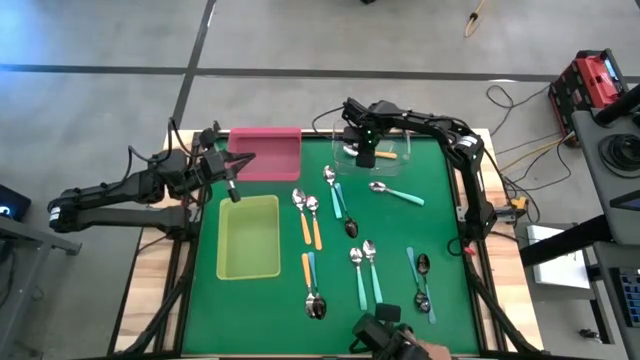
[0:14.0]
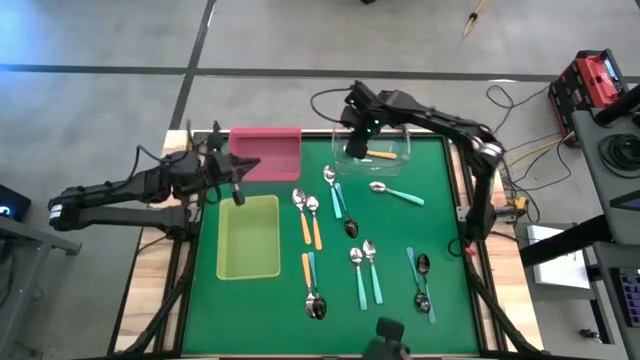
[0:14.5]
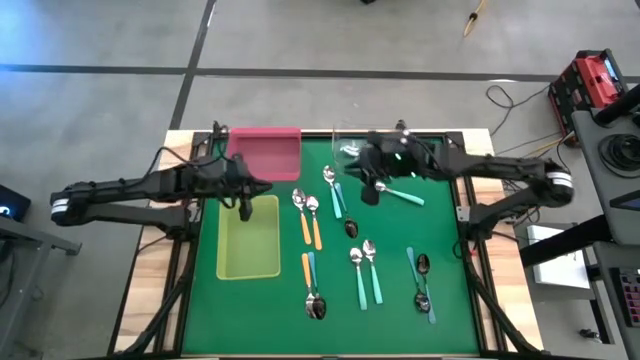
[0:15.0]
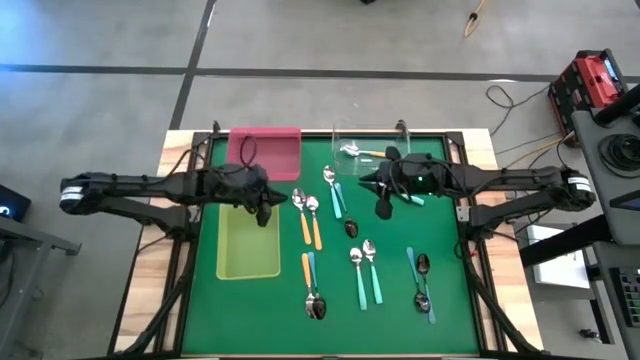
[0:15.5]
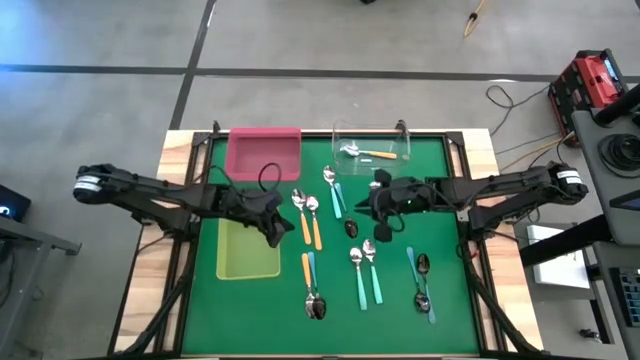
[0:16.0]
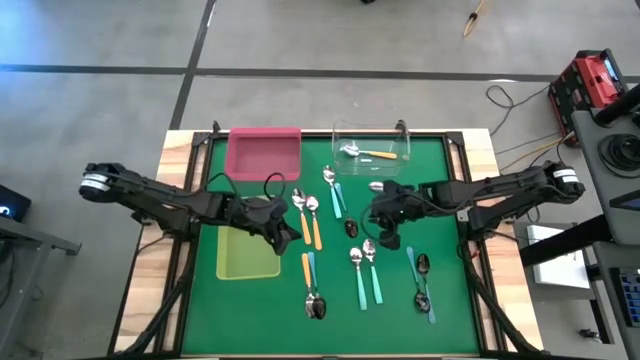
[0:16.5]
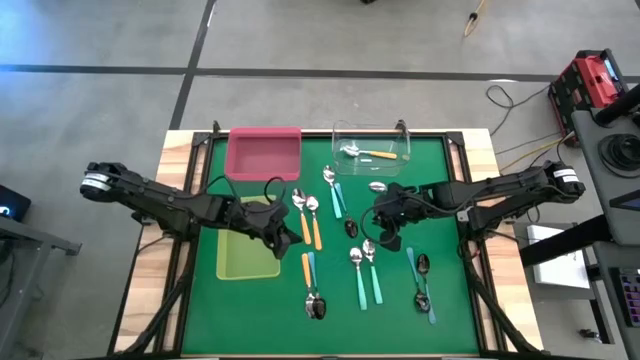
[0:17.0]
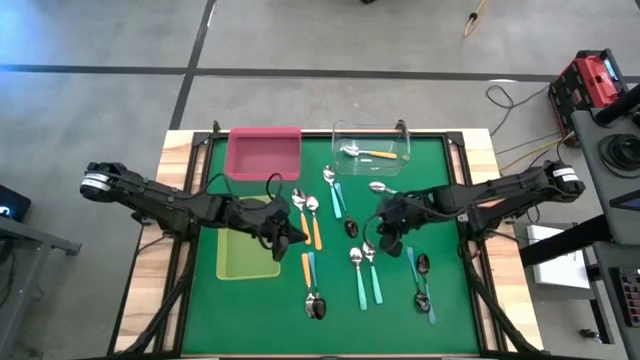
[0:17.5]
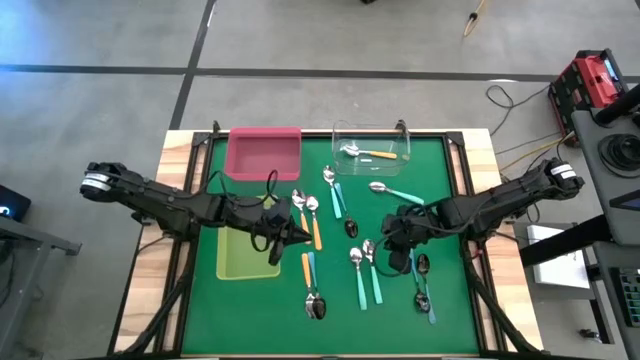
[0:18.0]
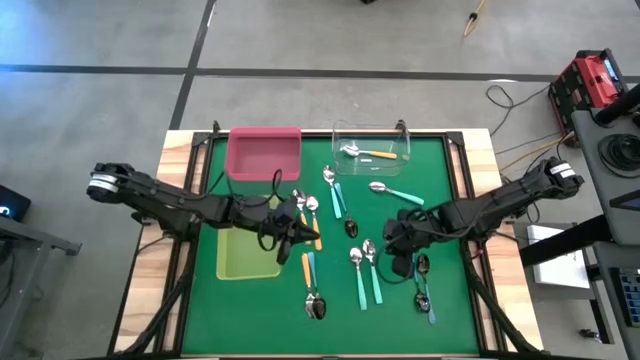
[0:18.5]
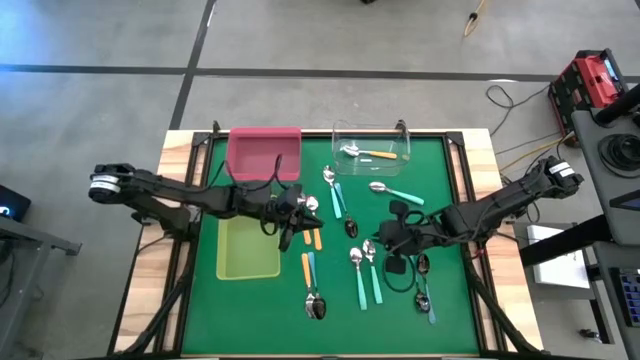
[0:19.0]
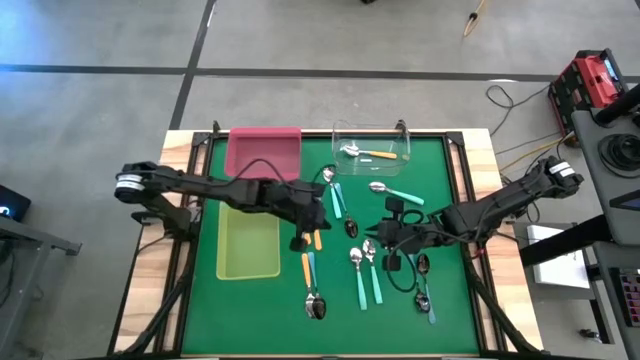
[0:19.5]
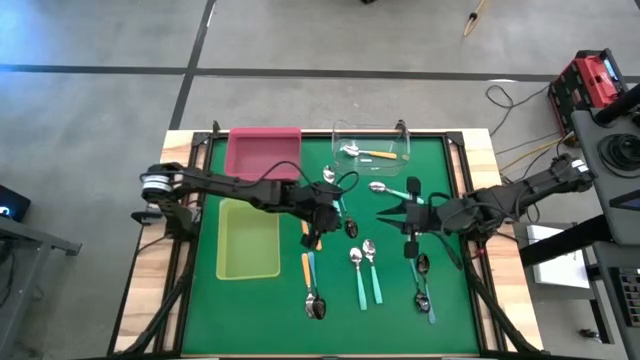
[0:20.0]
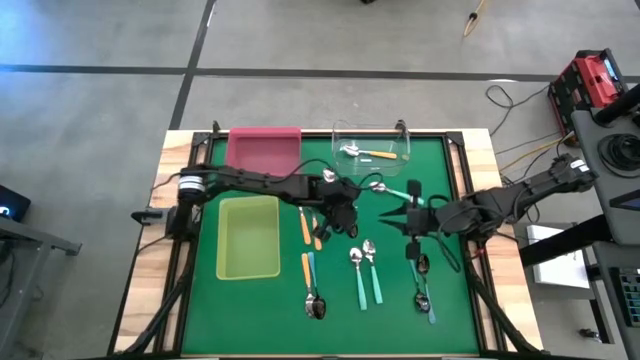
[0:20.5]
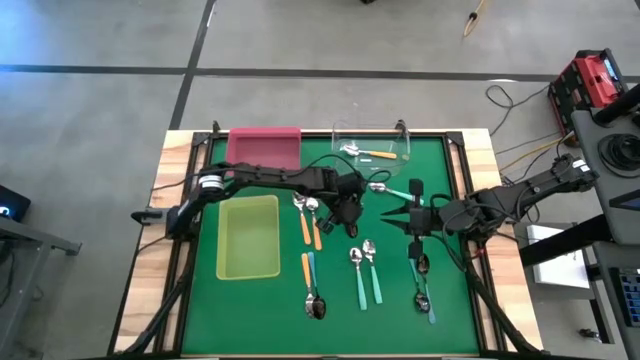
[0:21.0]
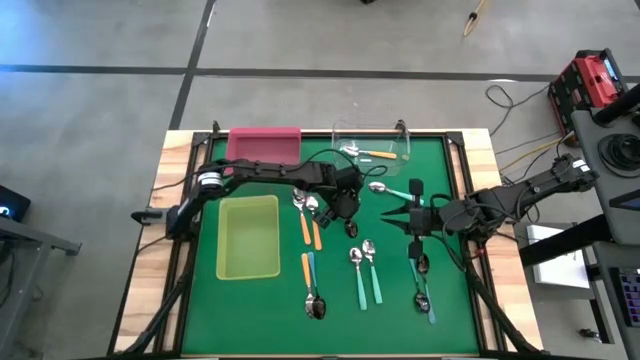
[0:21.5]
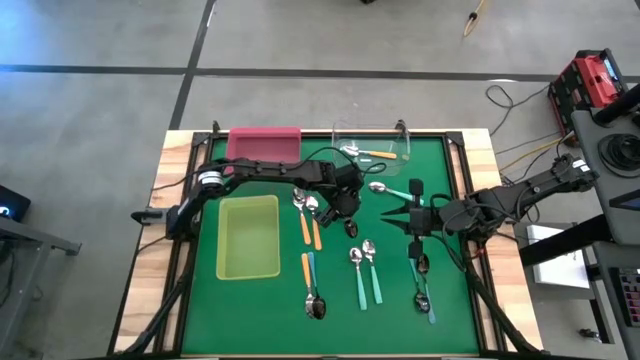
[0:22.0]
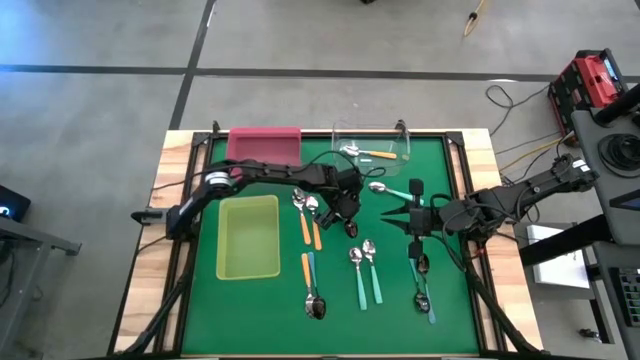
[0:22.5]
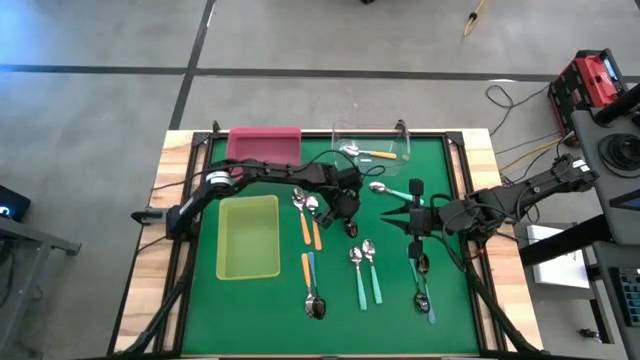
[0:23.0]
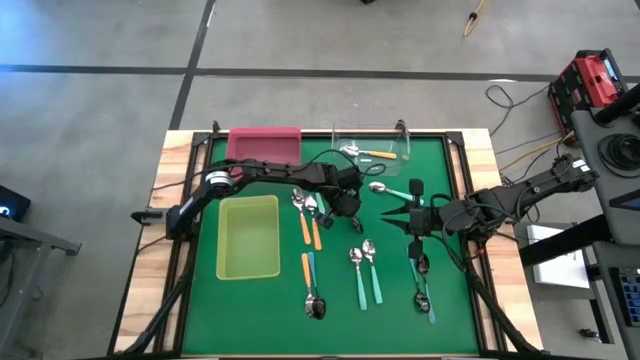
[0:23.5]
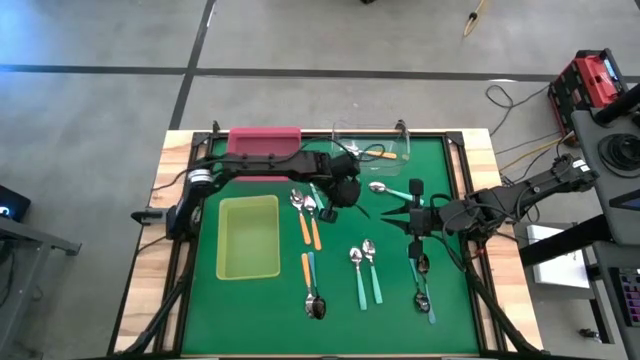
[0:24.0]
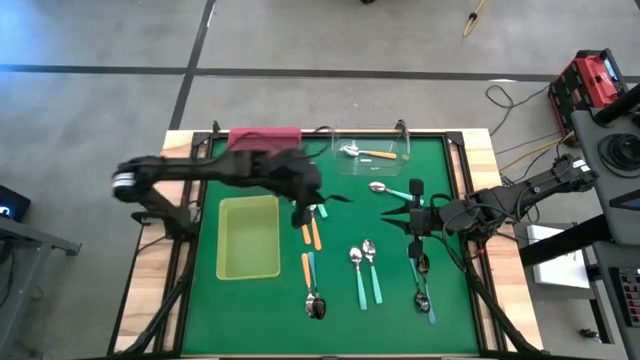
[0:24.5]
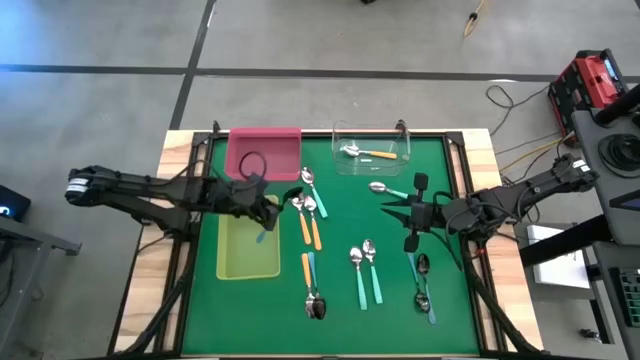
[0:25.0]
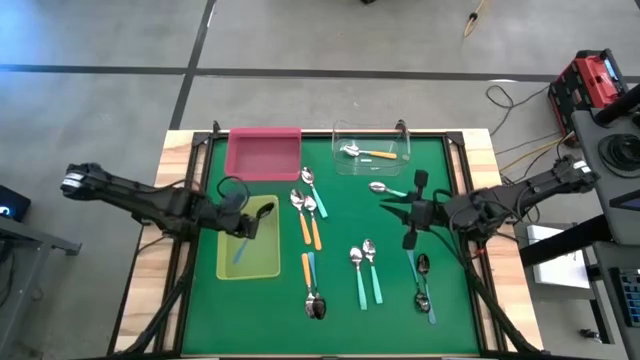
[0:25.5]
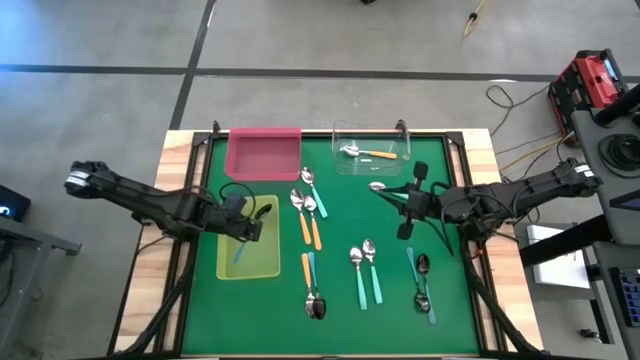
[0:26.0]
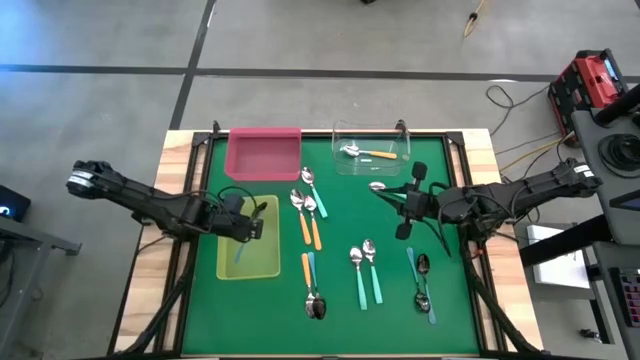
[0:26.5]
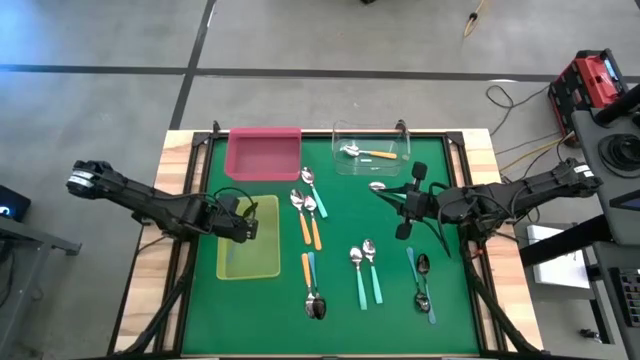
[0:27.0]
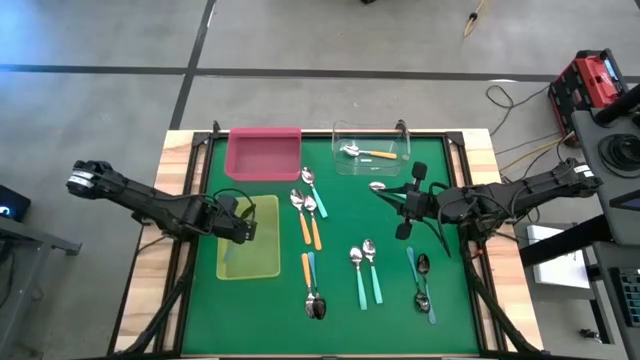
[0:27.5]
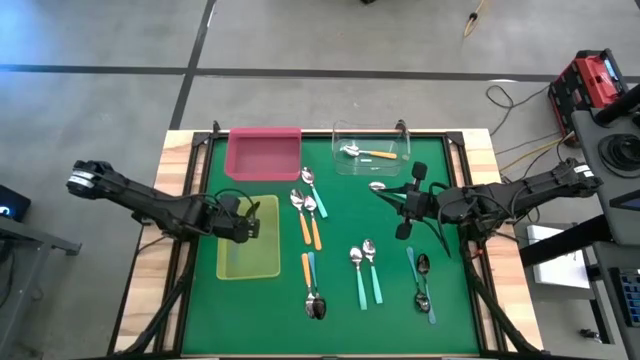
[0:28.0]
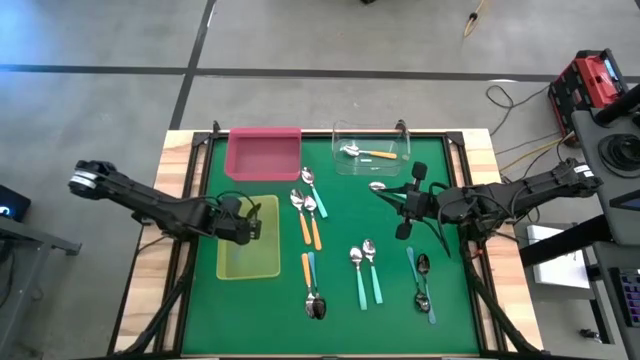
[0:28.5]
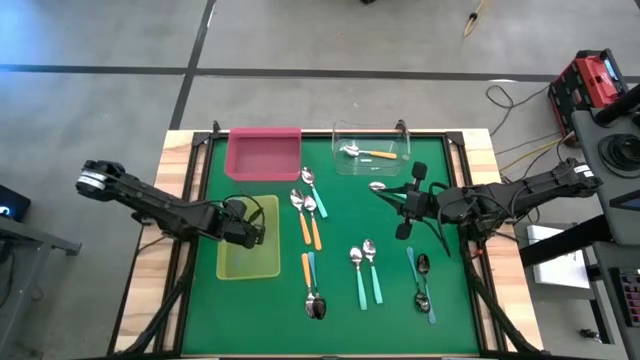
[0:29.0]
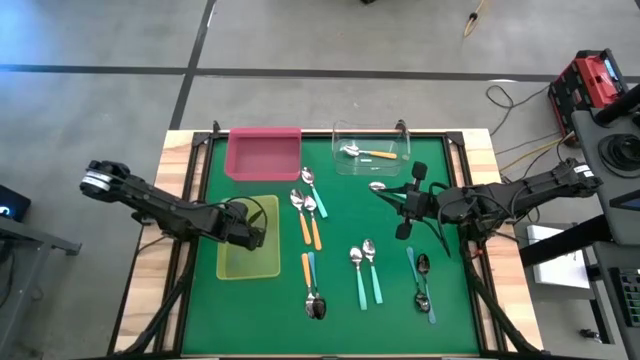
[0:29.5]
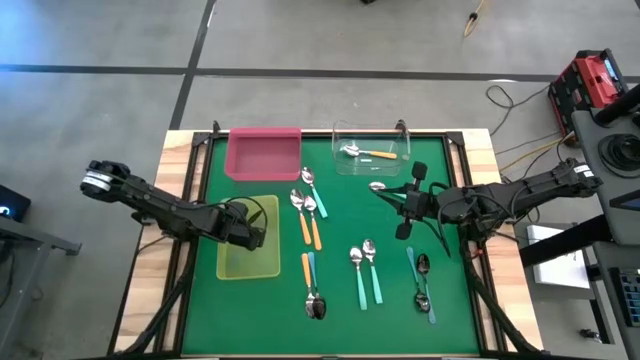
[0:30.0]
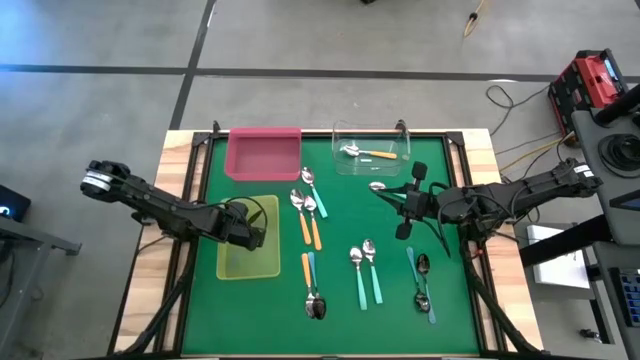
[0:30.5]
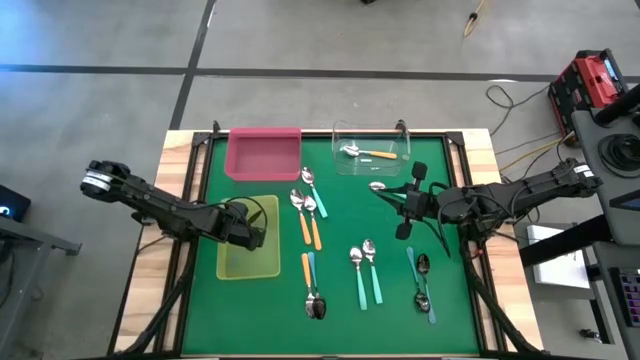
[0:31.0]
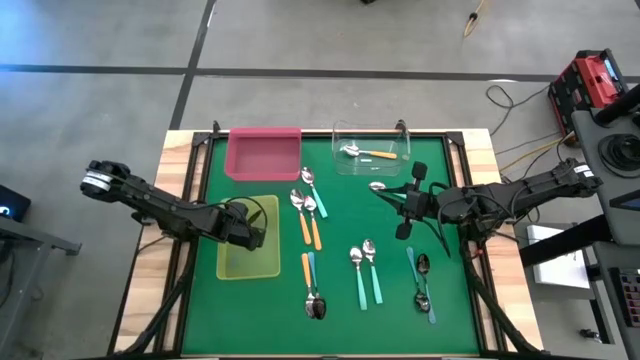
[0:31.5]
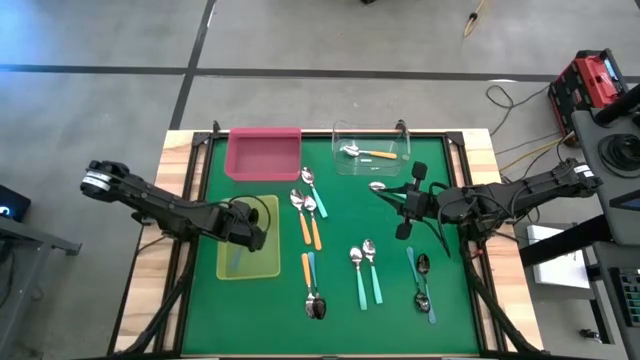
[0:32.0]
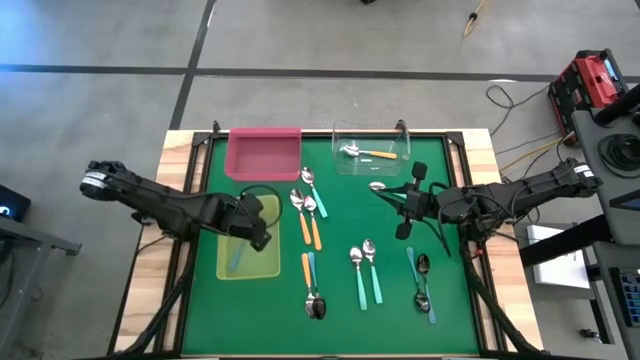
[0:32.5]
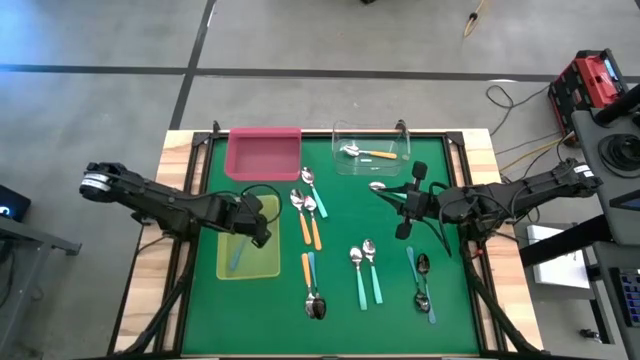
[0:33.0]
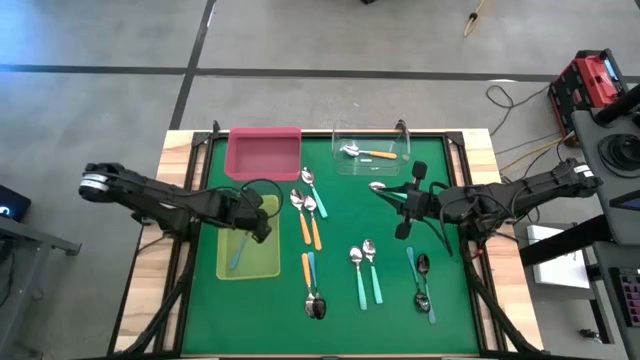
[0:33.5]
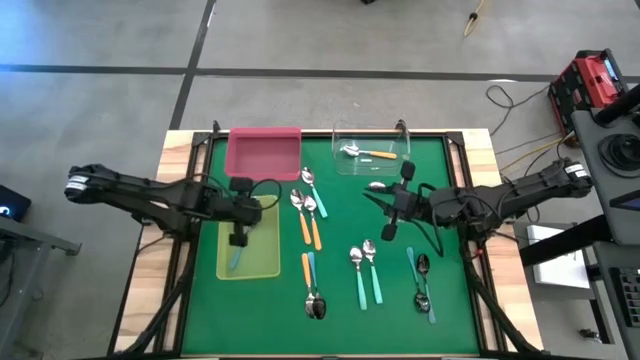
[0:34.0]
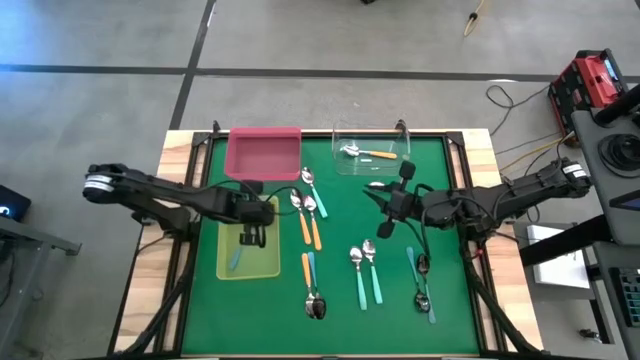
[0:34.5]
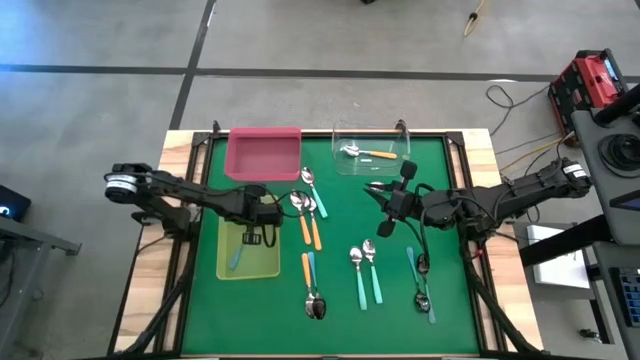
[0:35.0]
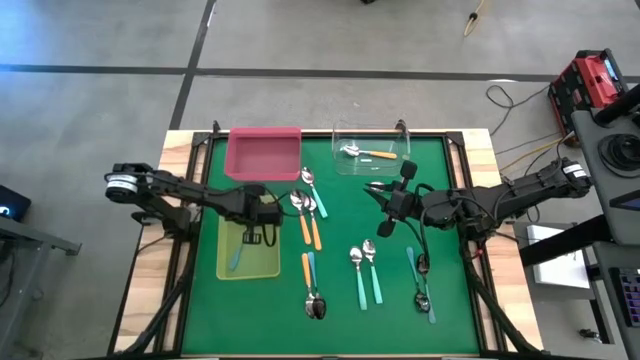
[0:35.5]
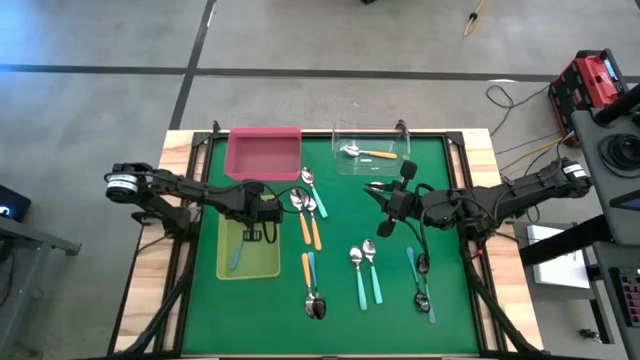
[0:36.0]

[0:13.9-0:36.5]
Task: Sort silverware by color (type)
Put the blue spoon into the yellow bin
